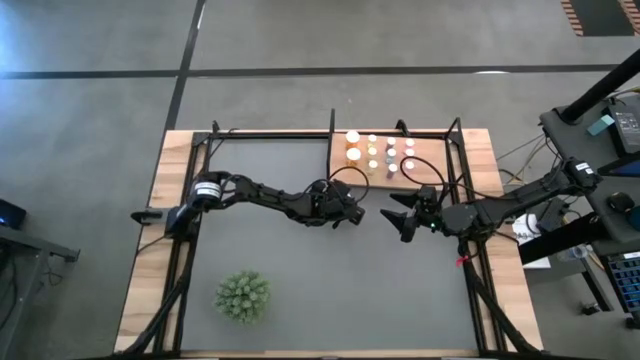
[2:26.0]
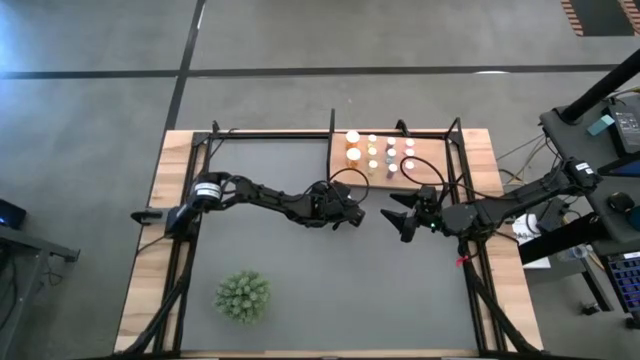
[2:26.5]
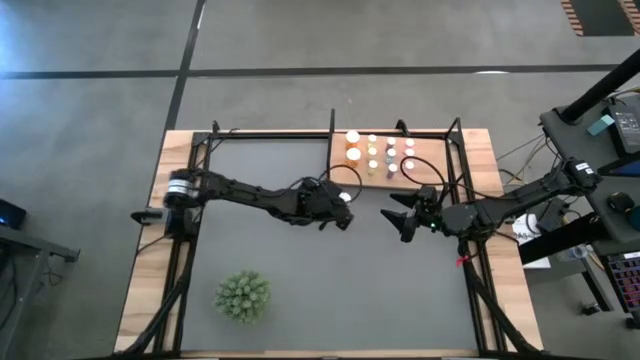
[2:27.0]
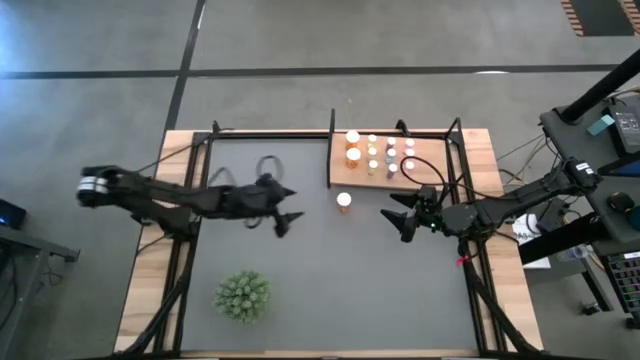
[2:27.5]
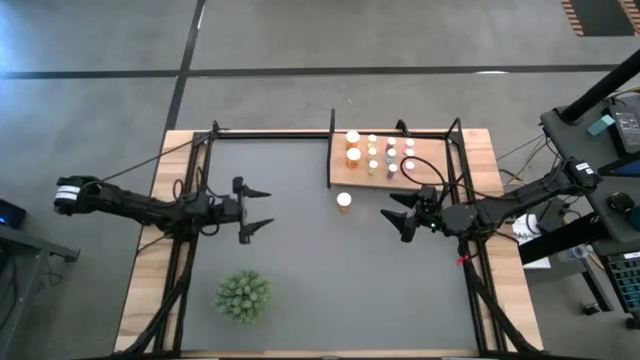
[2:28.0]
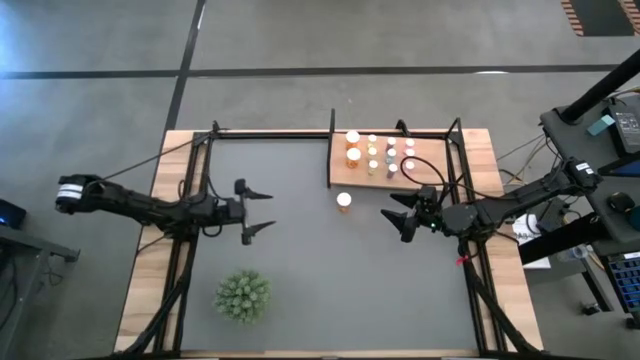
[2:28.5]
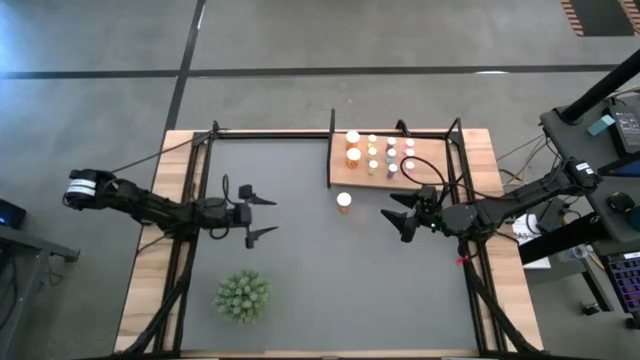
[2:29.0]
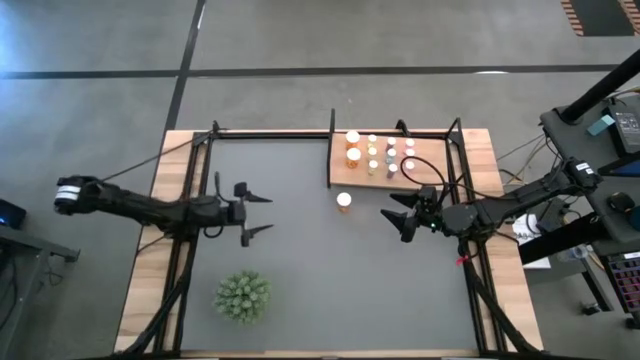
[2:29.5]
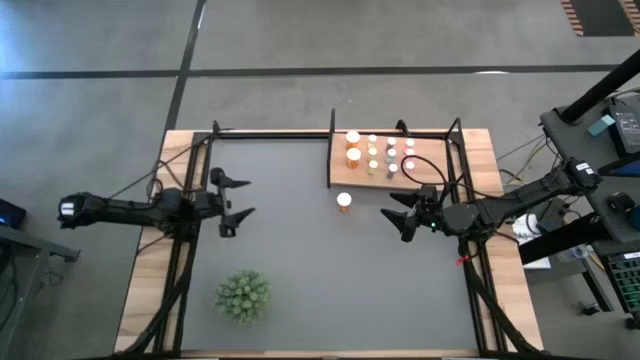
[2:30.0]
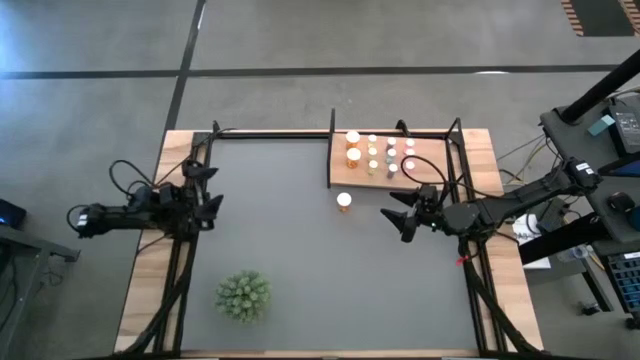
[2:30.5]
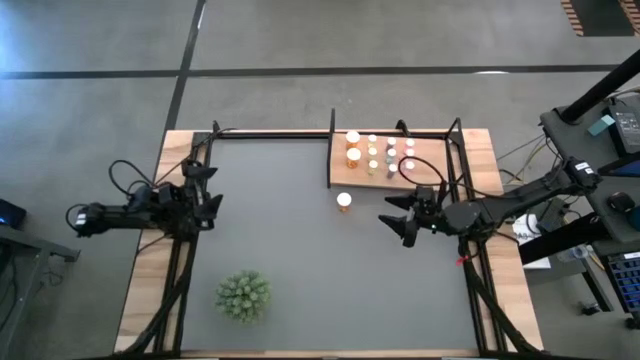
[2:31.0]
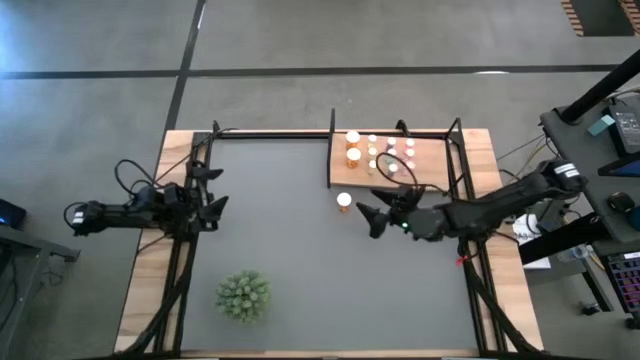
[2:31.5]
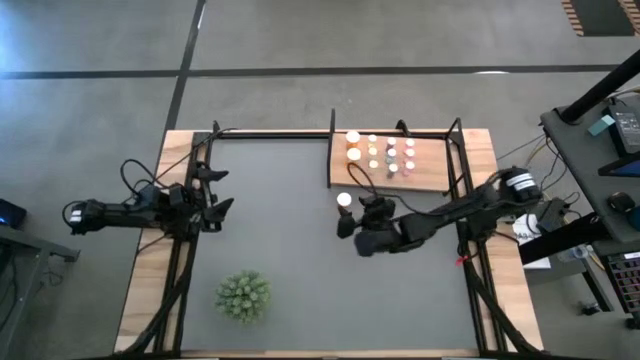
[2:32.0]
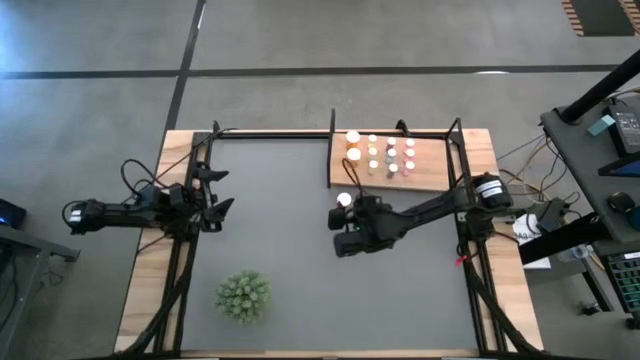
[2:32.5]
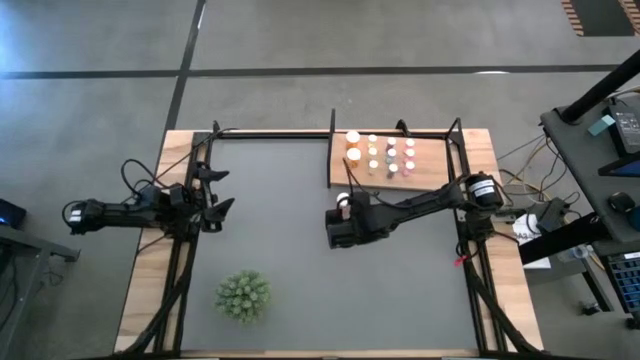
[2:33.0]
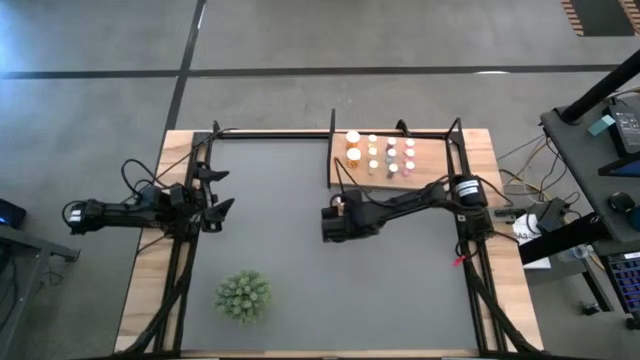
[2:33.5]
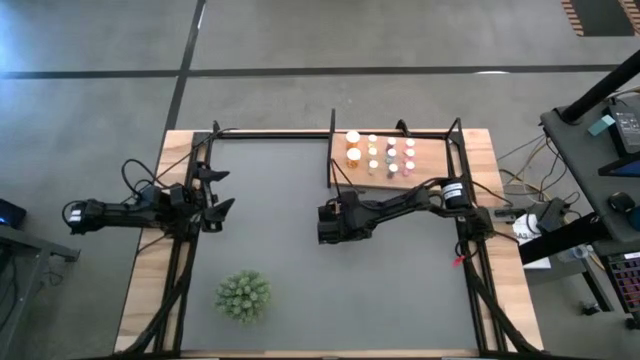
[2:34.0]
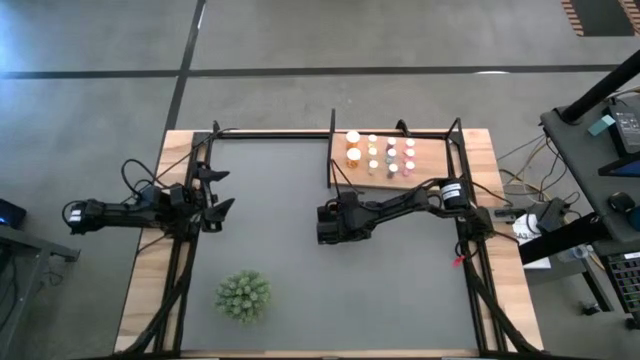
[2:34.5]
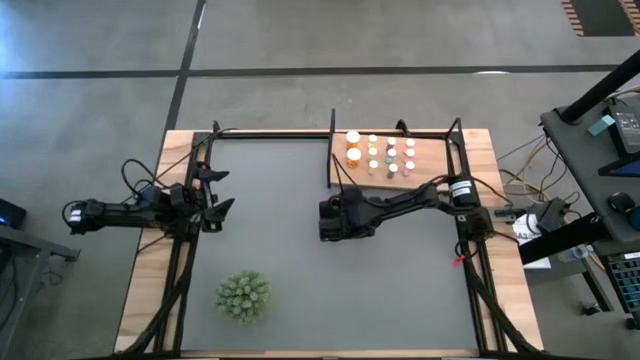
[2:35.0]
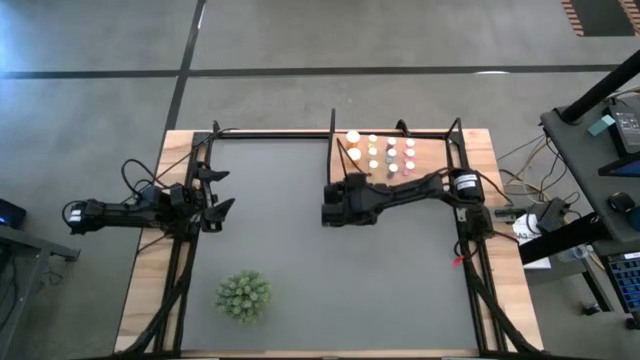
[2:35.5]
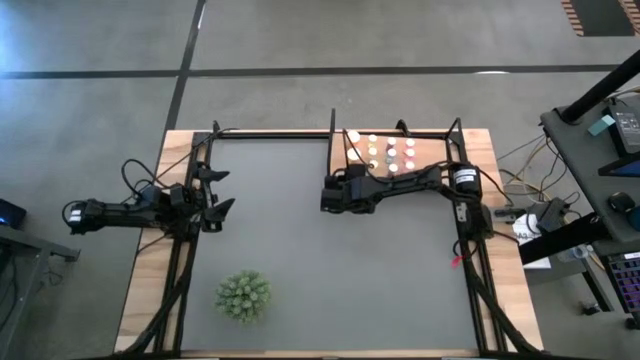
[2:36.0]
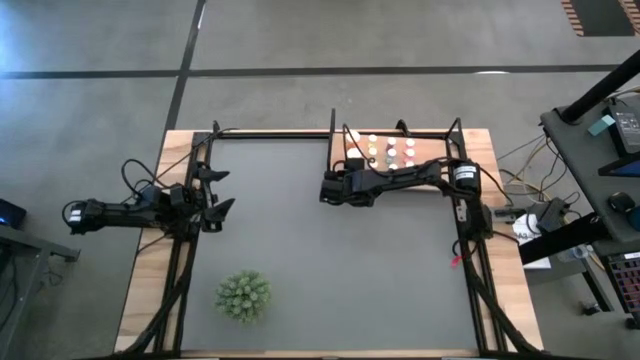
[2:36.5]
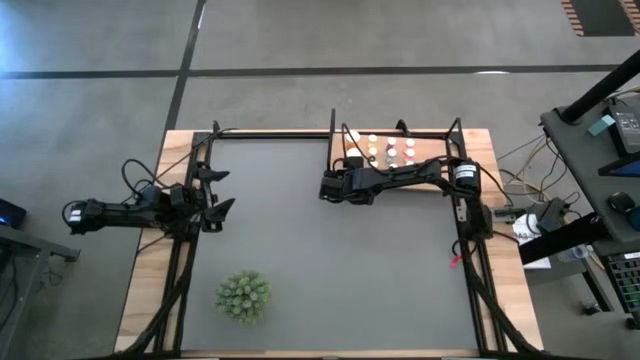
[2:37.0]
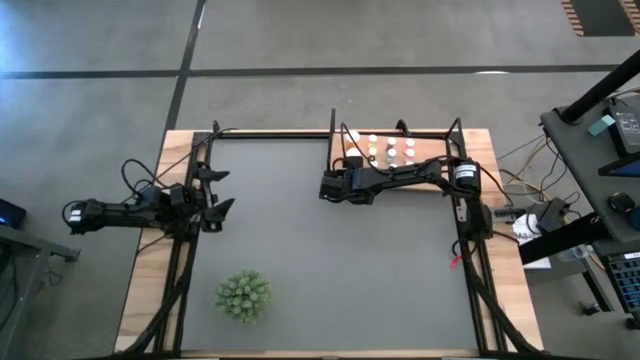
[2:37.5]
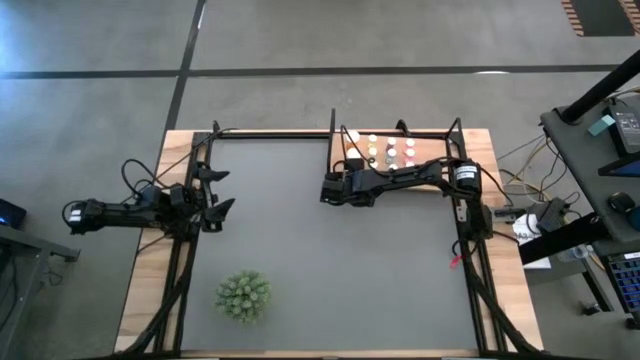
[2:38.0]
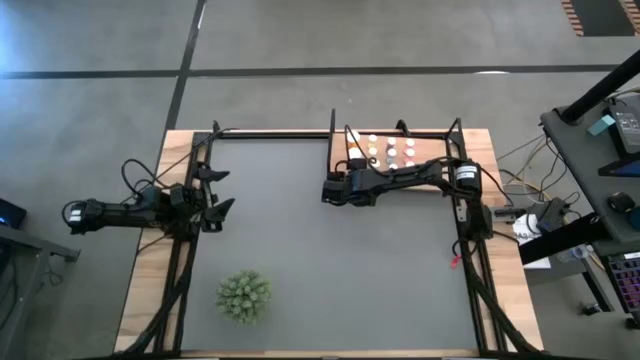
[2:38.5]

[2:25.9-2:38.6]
Task: Pick and place medicine bottles onto shelf by color
Put the orange pill bottle on the shelf aligned with the other orange pill bottles

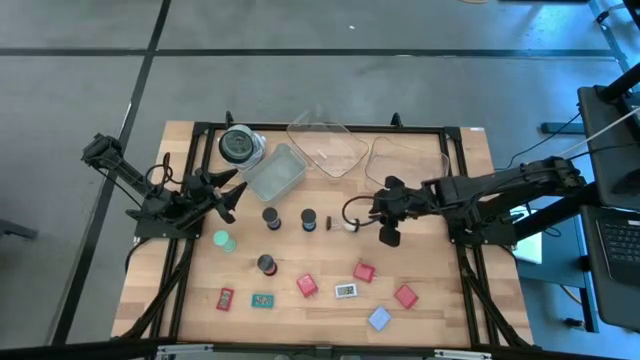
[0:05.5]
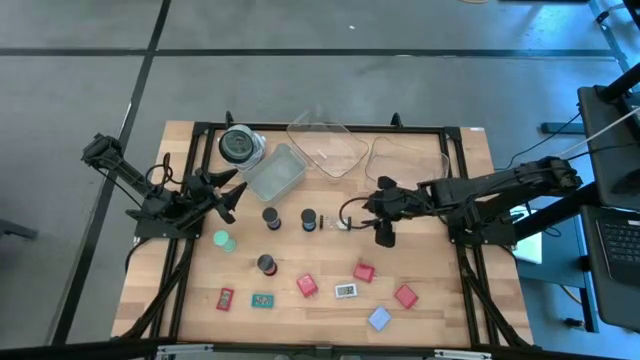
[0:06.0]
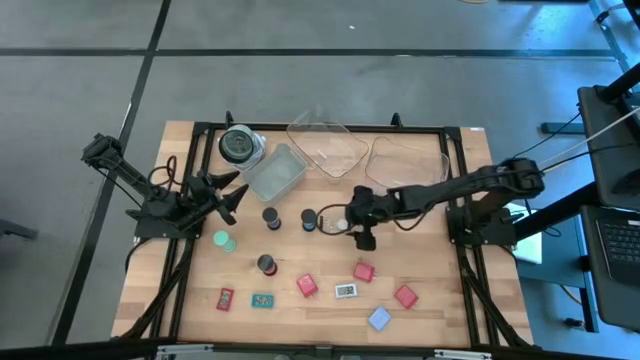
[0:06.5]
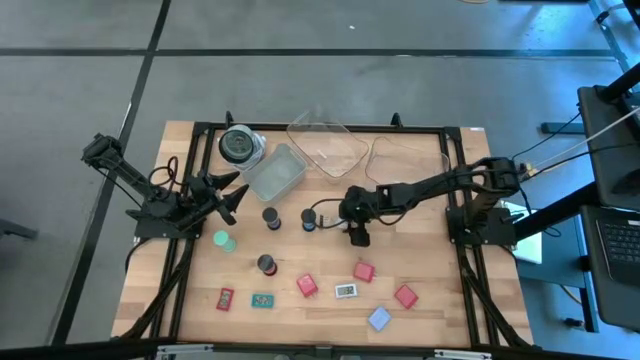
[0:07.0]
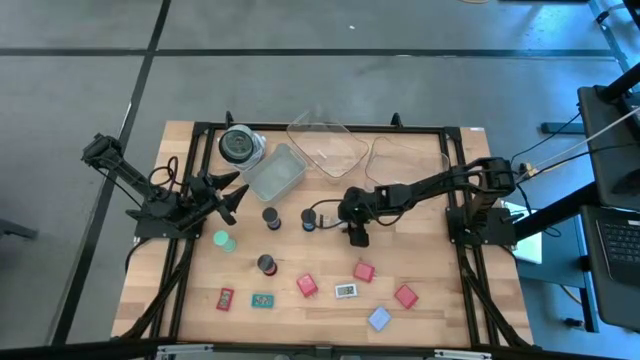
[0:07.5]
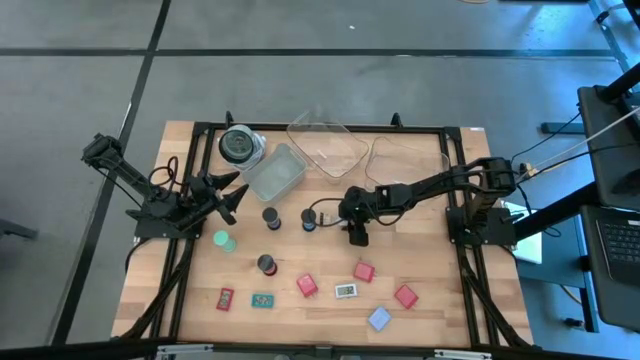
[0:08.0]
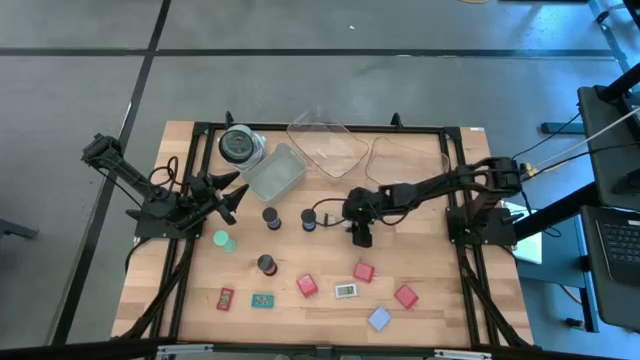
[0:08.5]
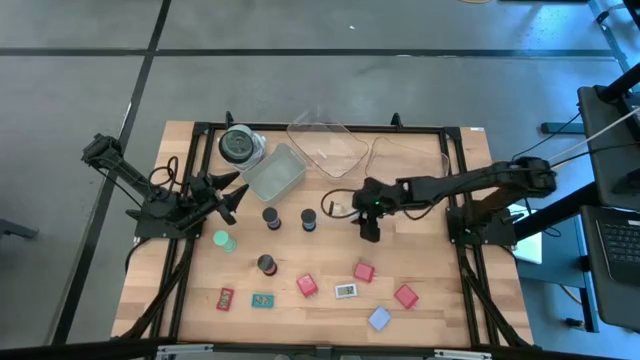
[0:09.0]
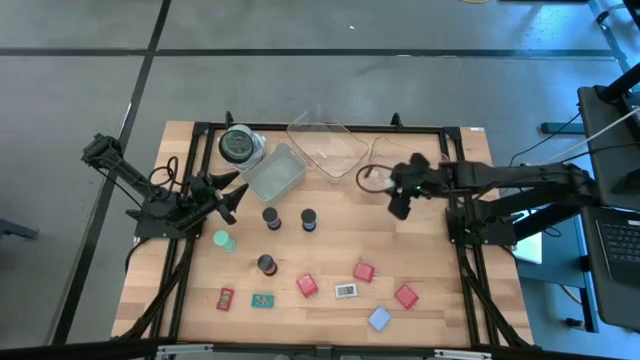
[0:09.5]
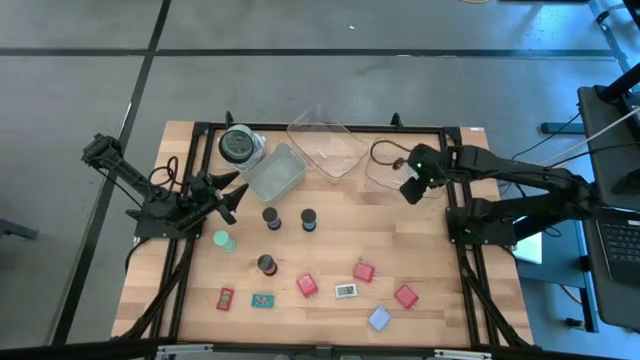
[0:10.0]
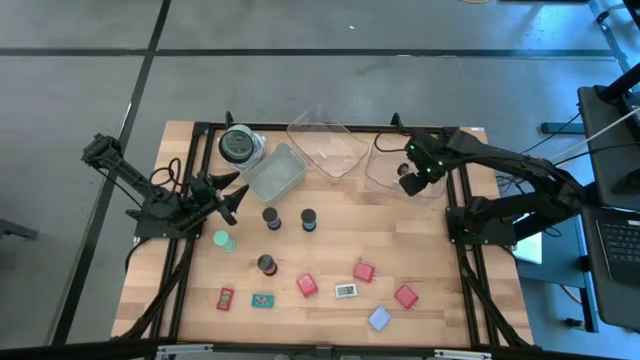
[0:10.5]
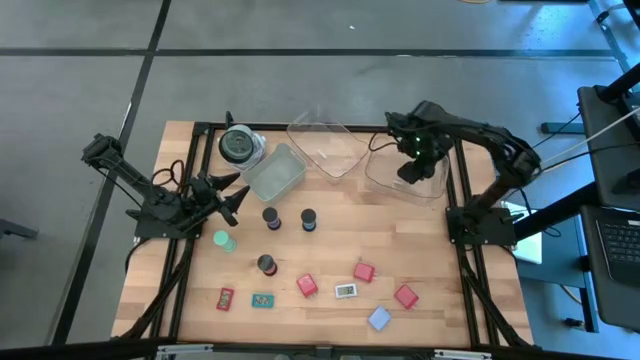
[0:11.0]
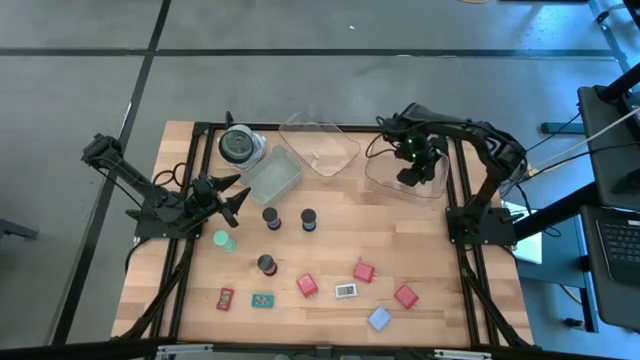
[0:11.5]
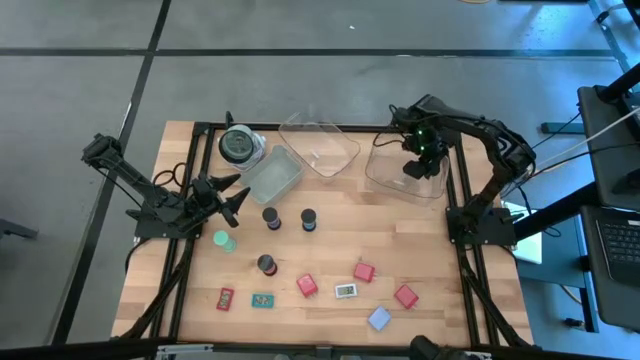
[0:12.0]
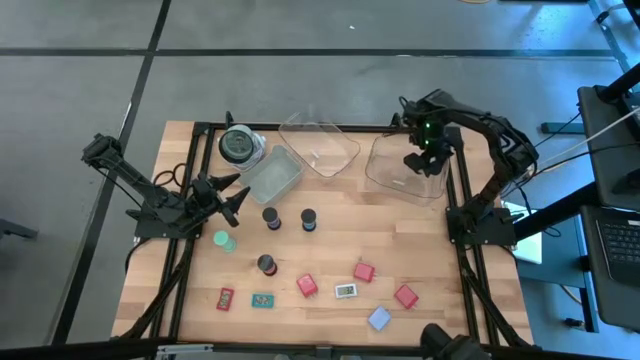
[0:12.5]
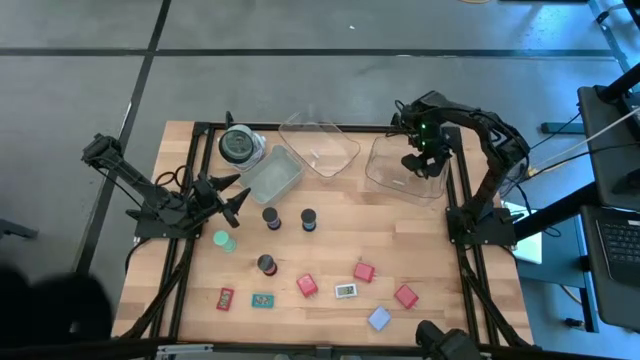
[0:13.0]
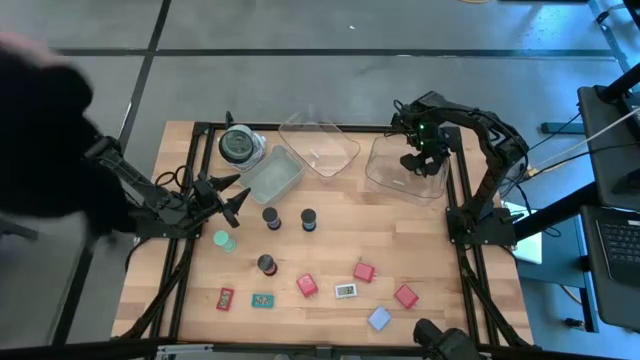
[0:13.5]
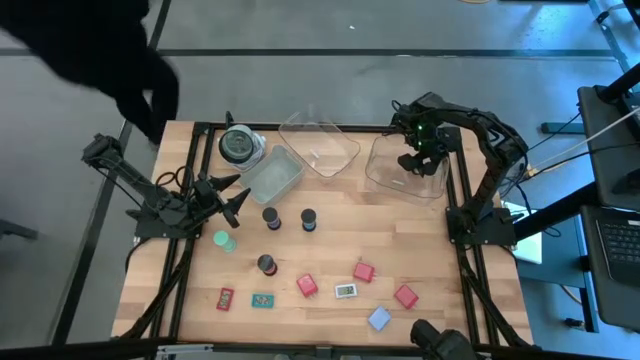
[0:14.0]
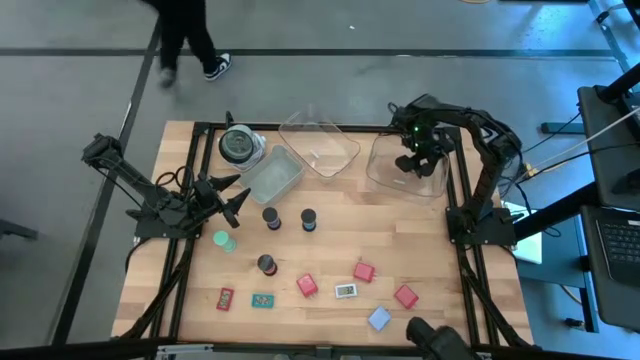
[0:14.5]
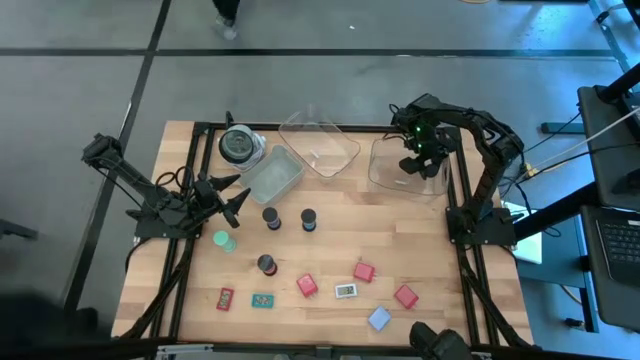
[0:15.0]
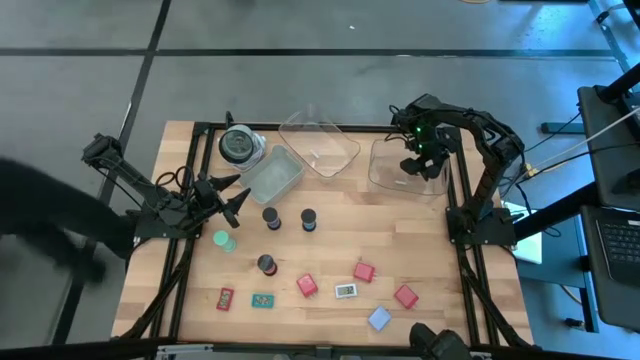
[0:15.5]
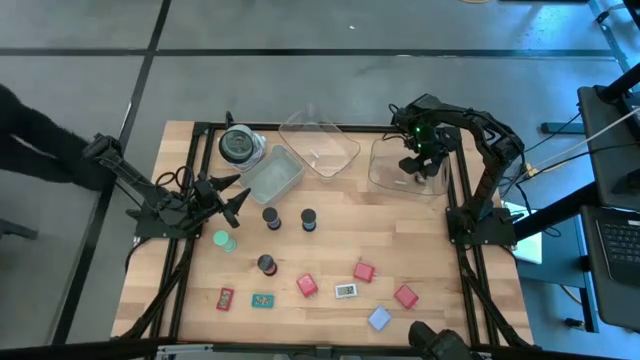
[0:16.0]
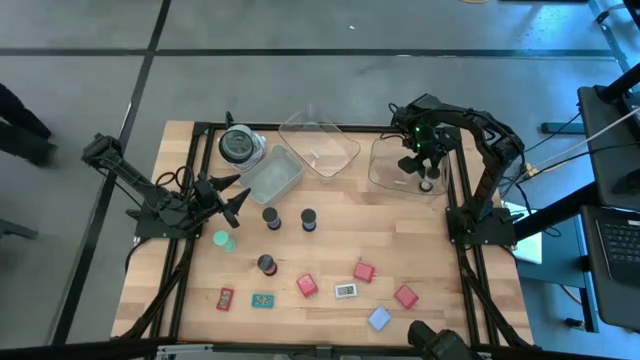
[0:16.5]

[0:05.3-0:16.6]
Task: Pick & Place Office items
Put the white hourglass into the right transparent bin
